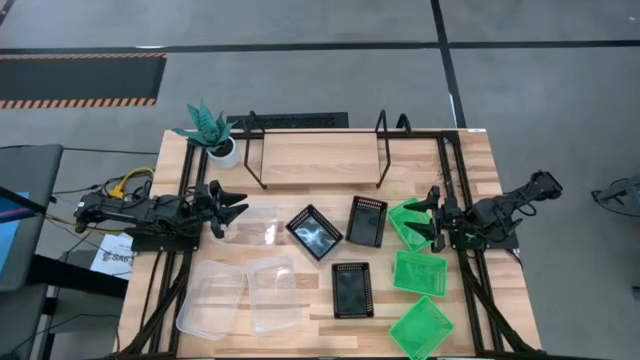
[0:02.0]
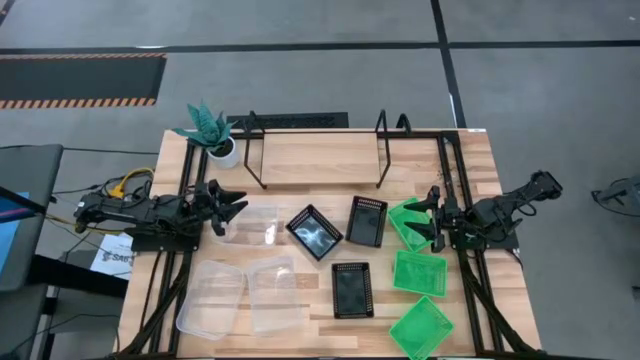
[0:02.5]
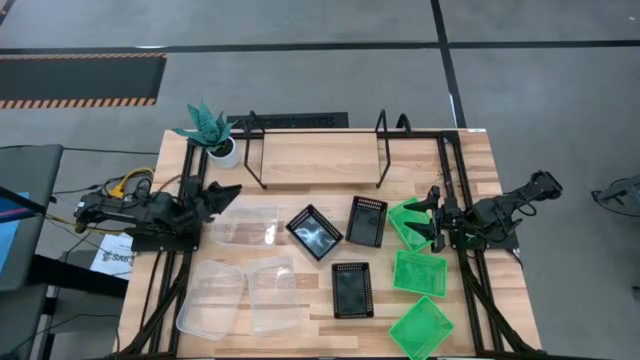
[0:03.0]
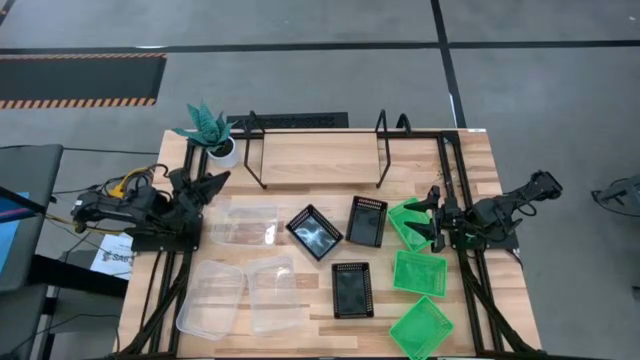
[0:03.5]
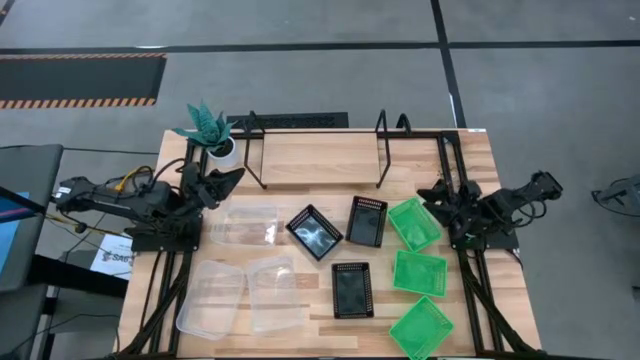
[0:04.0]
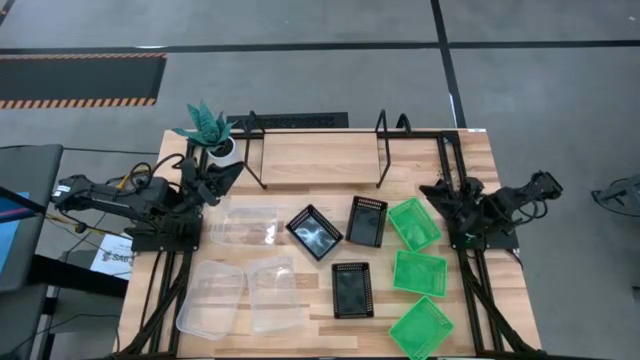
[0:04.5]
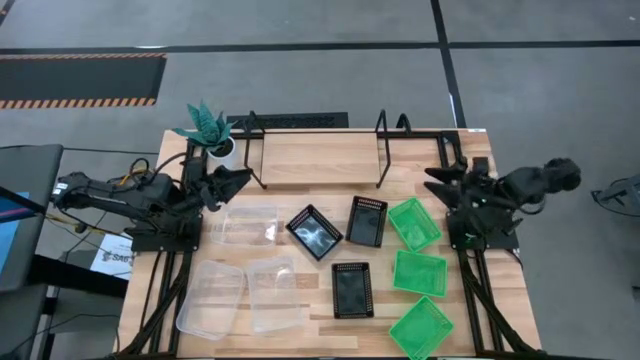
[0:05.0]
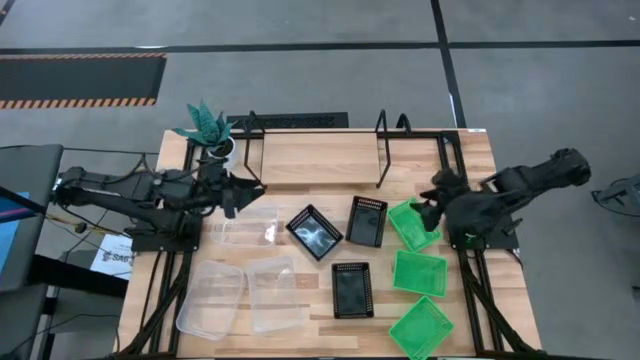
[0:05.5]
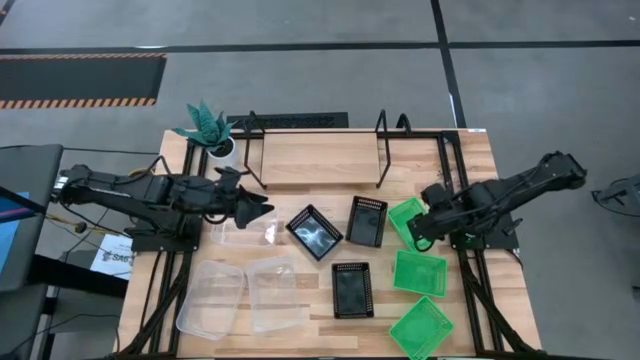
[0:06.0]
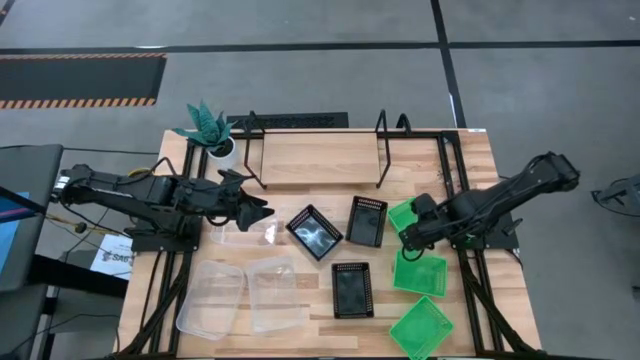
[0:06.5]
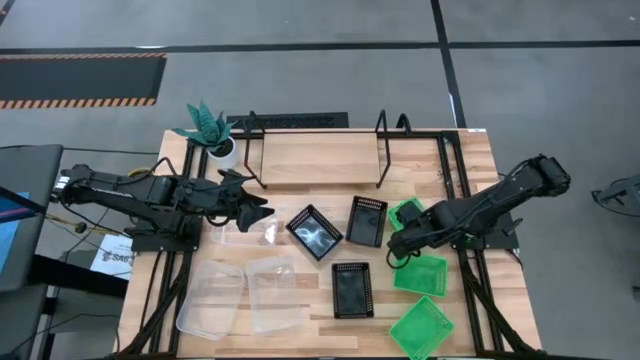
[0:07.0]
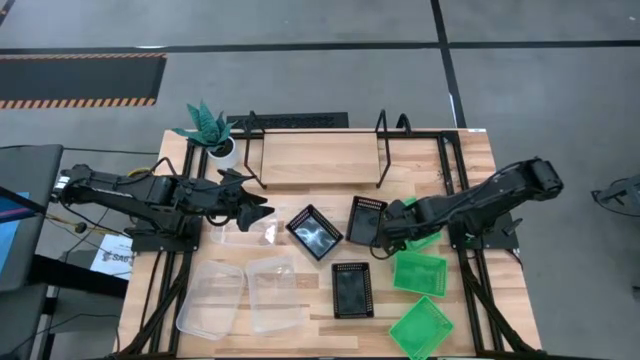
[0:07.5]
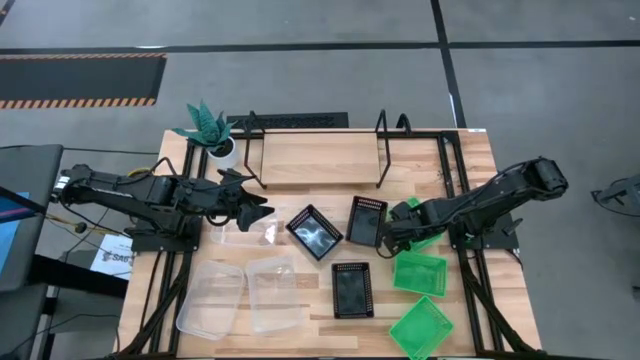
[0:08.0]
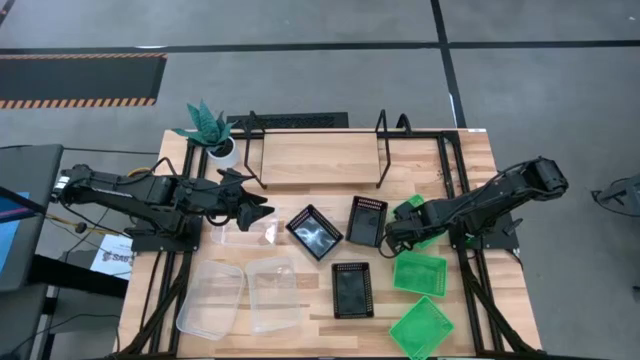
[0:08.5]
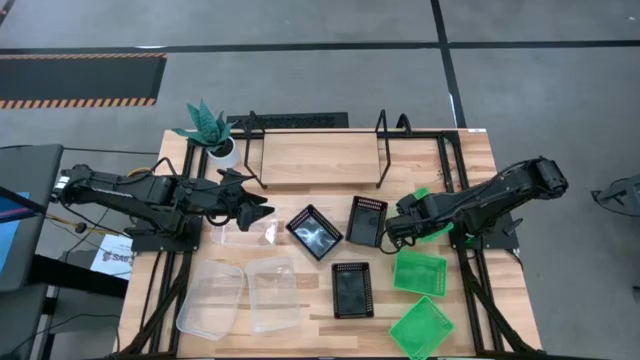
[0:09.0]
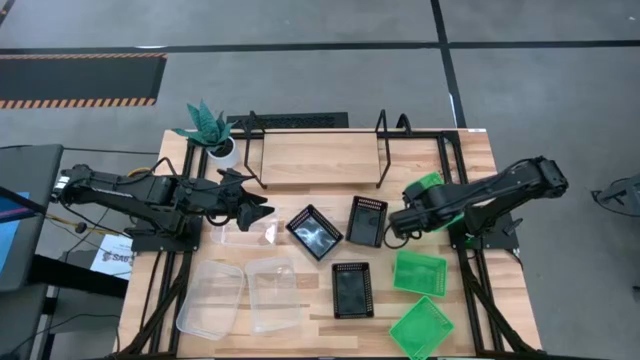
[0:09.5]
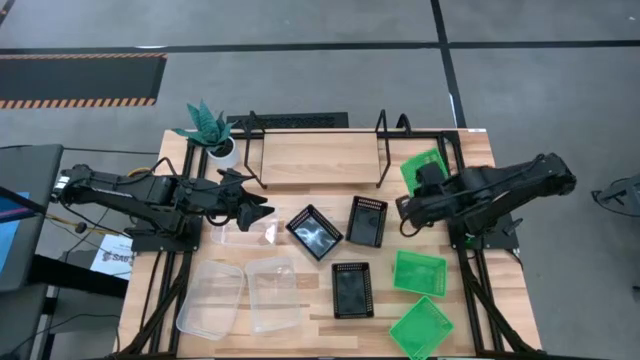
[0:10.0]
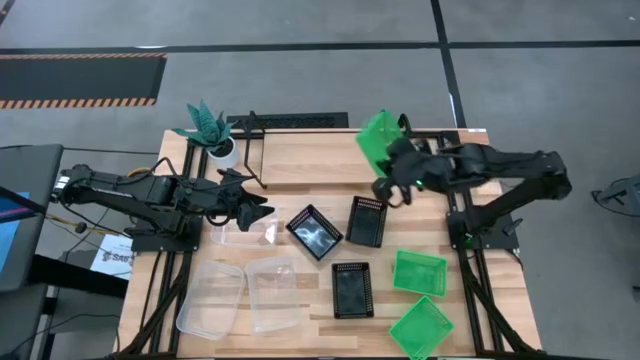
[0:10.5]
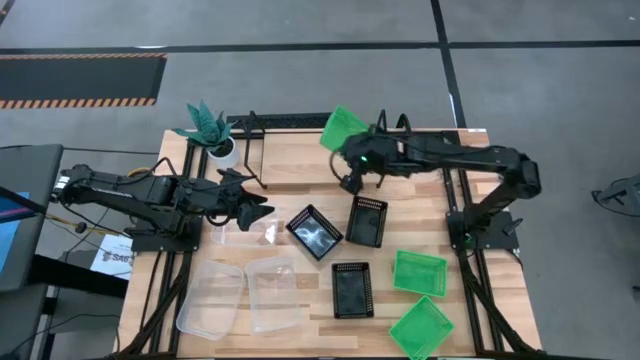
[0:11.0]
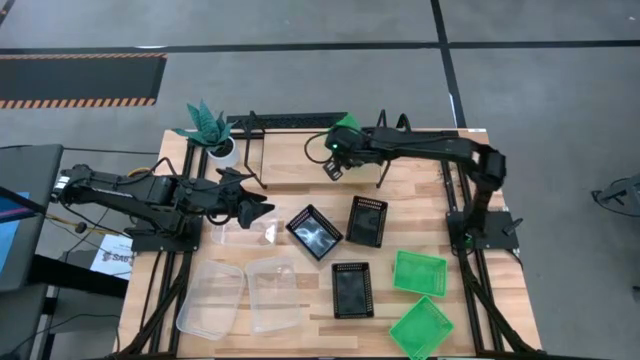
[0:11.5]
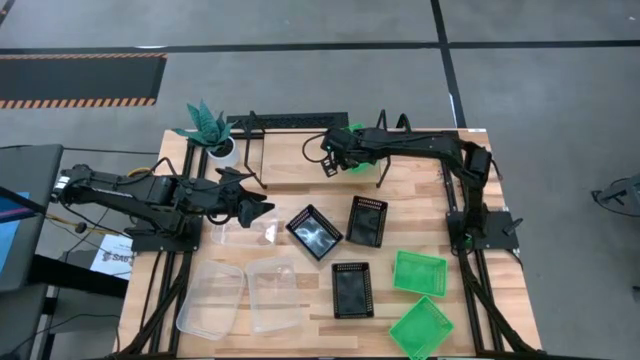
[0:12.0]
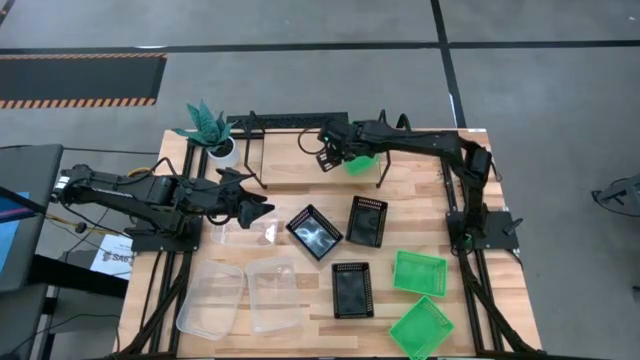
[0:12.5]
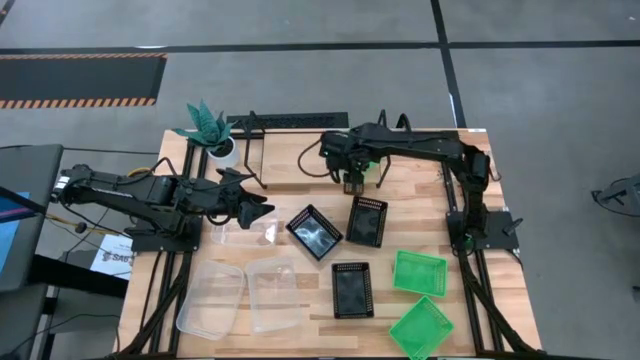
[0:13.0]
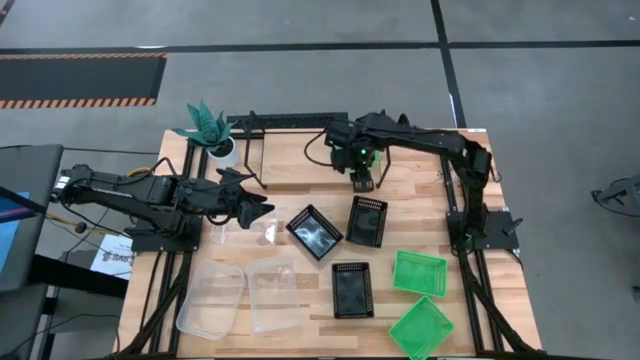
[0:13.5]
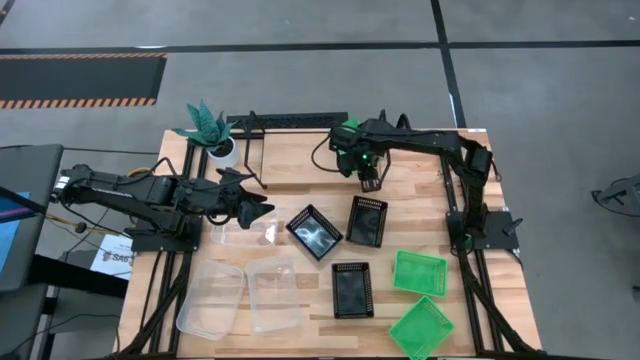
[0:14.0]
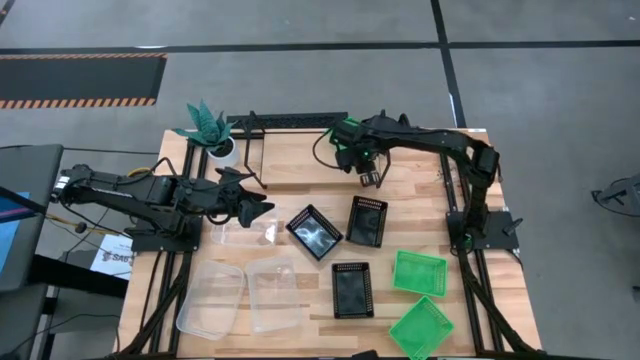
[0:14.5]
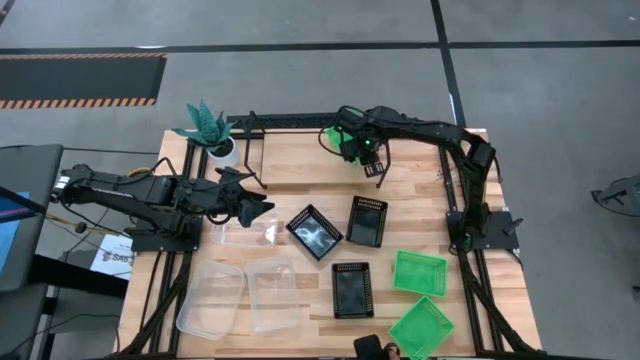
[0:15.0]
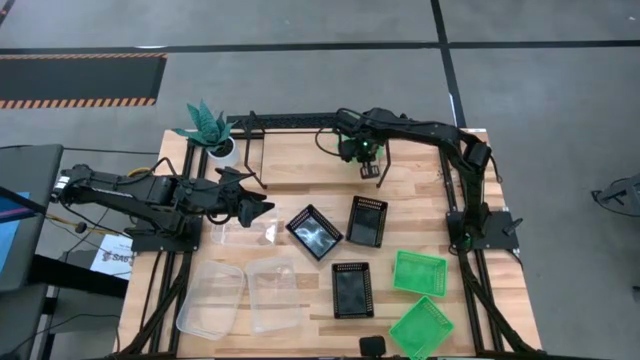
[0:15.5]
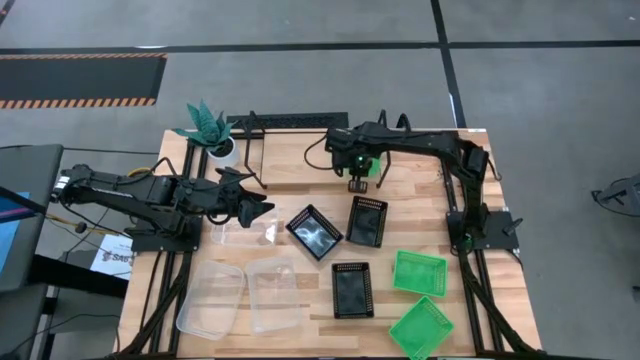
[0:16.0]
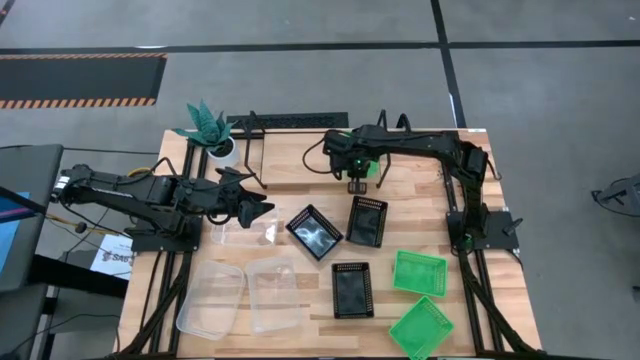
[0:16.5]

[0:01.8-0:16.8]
Task: Stack baskets on shelf by color
Put the top green bin on the shelf
